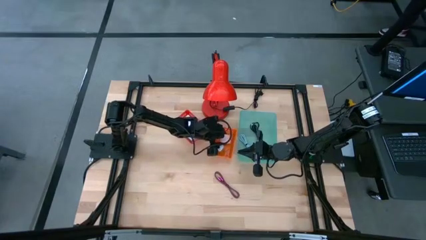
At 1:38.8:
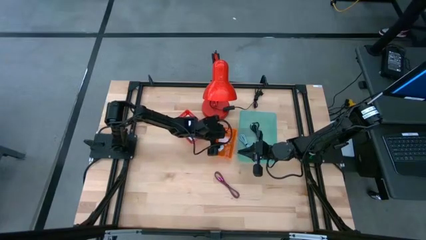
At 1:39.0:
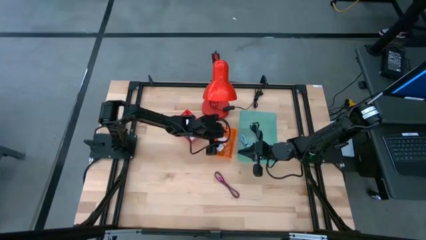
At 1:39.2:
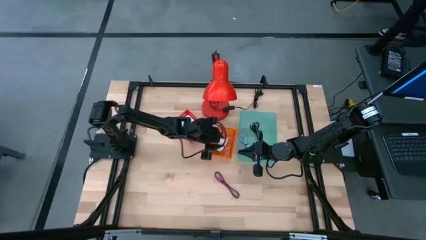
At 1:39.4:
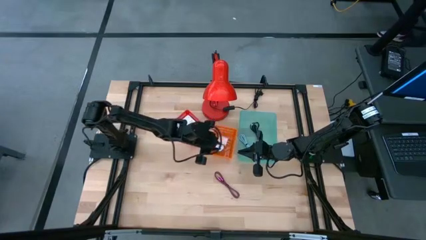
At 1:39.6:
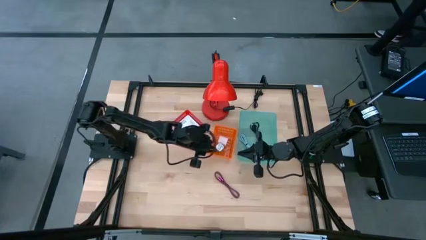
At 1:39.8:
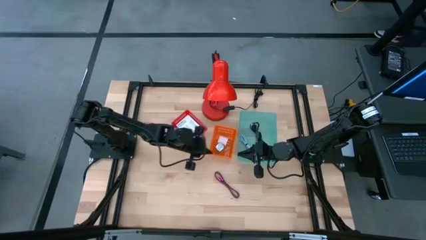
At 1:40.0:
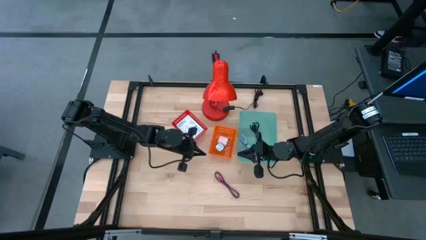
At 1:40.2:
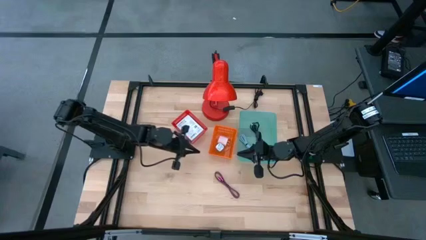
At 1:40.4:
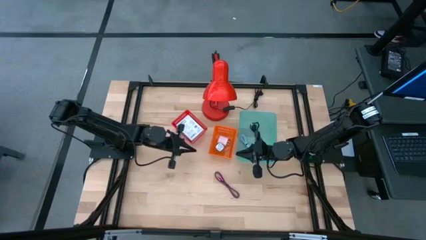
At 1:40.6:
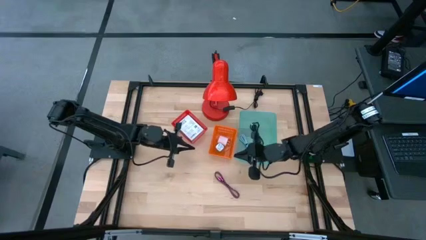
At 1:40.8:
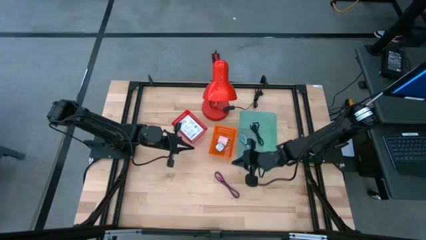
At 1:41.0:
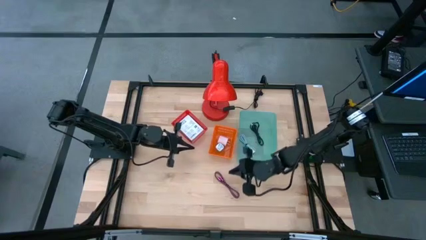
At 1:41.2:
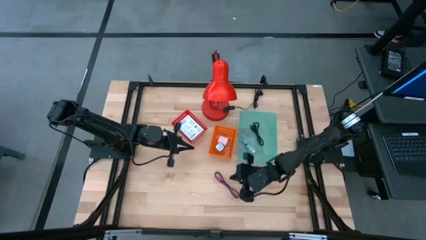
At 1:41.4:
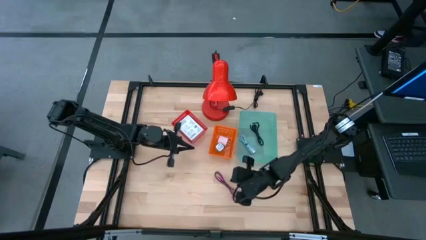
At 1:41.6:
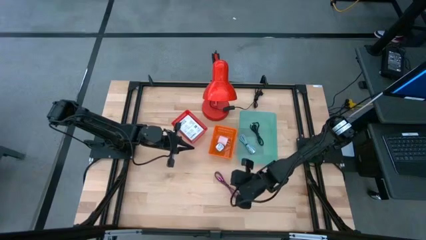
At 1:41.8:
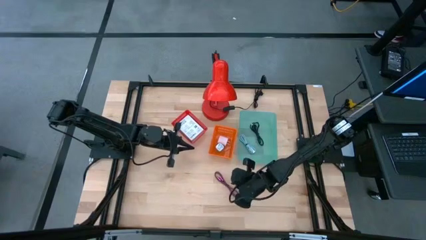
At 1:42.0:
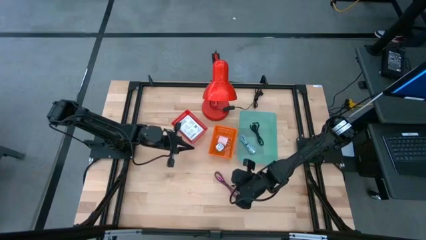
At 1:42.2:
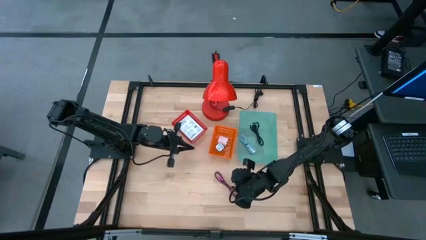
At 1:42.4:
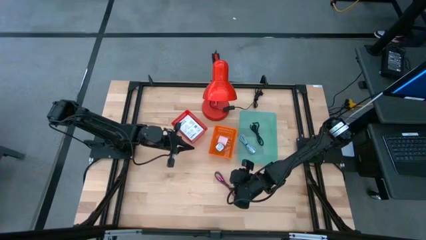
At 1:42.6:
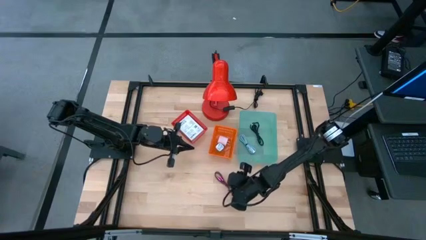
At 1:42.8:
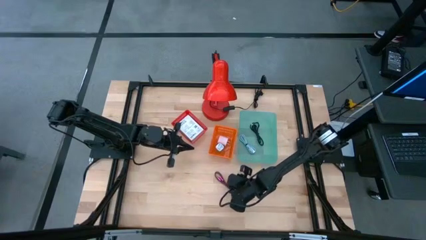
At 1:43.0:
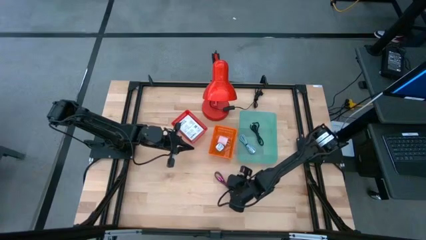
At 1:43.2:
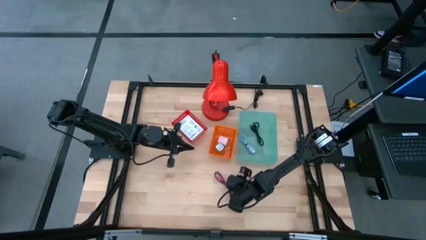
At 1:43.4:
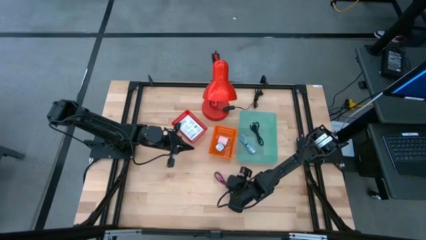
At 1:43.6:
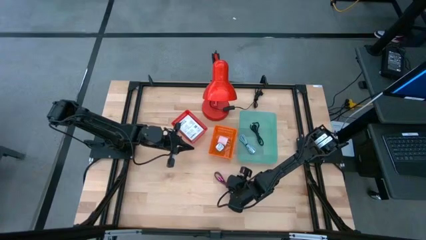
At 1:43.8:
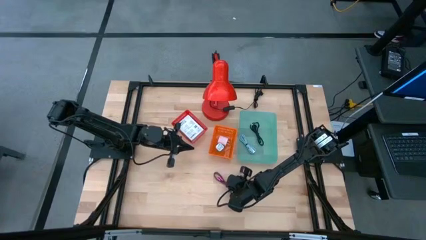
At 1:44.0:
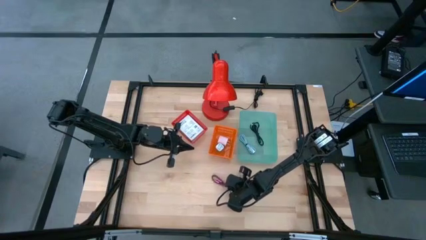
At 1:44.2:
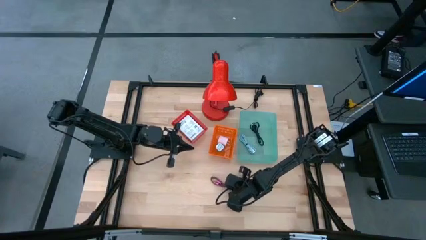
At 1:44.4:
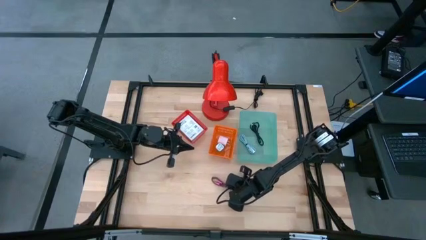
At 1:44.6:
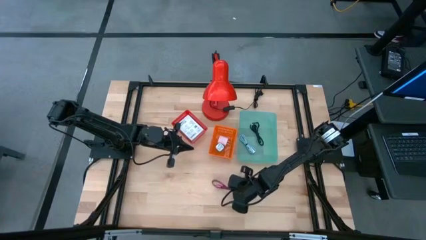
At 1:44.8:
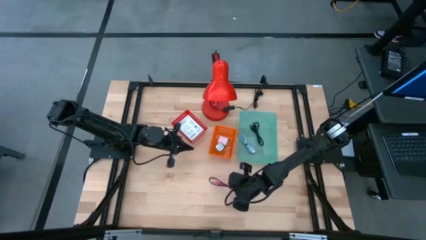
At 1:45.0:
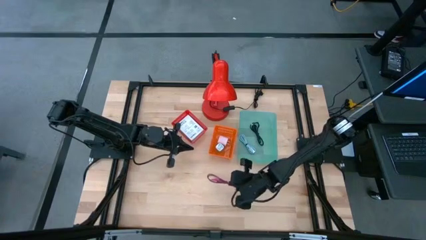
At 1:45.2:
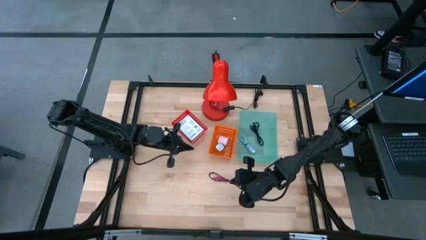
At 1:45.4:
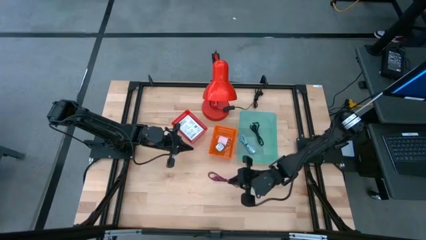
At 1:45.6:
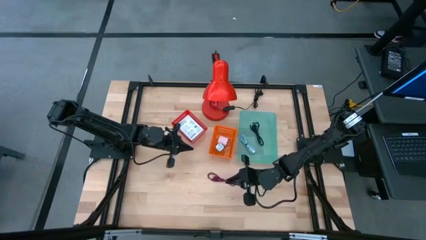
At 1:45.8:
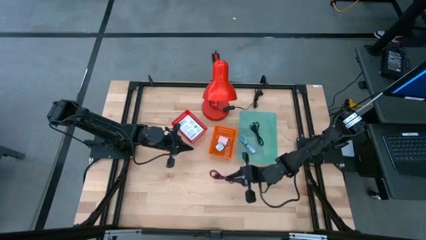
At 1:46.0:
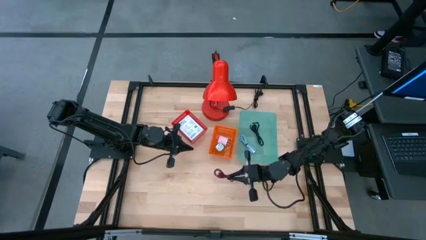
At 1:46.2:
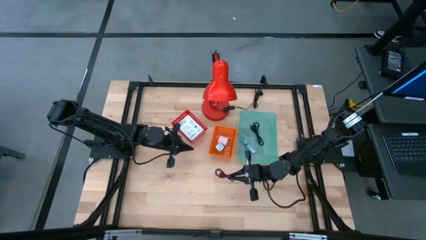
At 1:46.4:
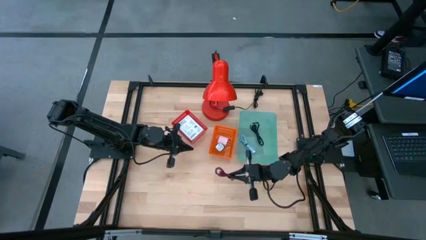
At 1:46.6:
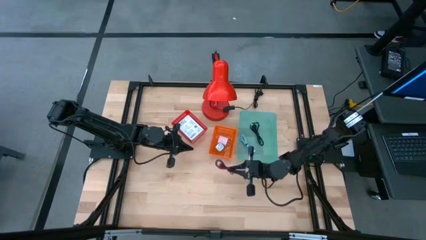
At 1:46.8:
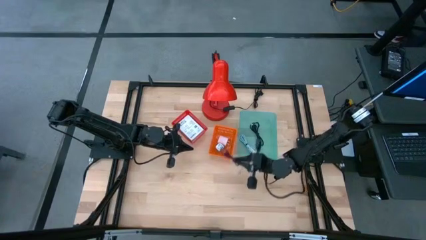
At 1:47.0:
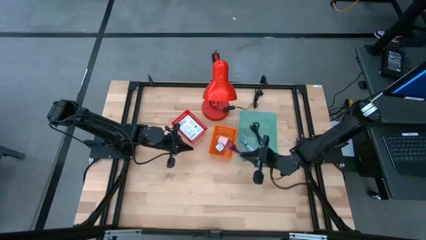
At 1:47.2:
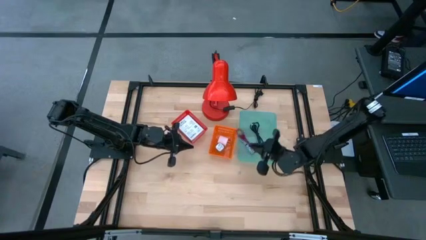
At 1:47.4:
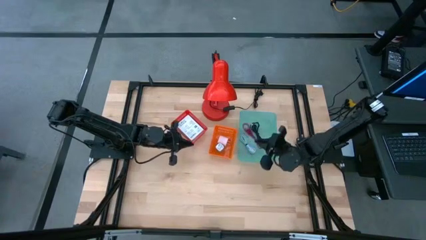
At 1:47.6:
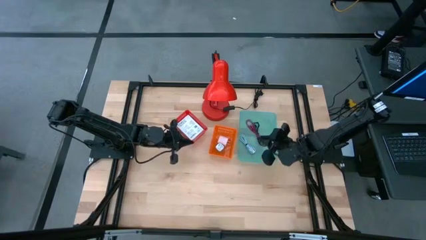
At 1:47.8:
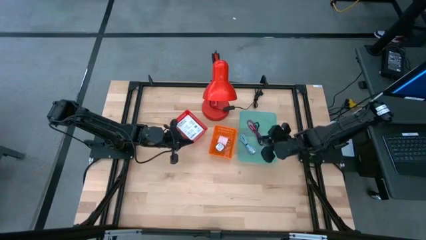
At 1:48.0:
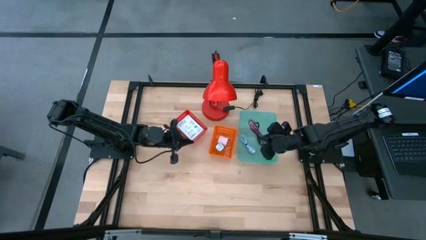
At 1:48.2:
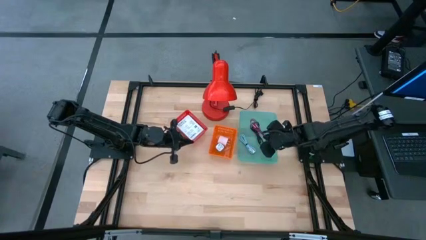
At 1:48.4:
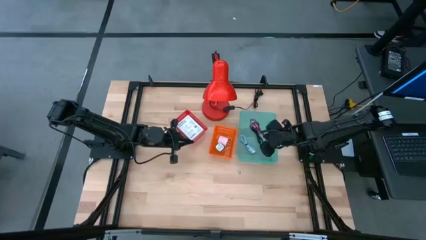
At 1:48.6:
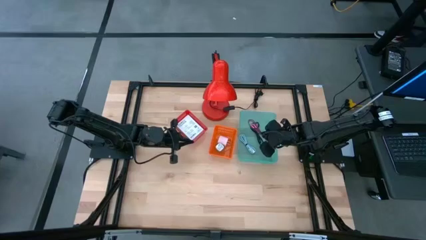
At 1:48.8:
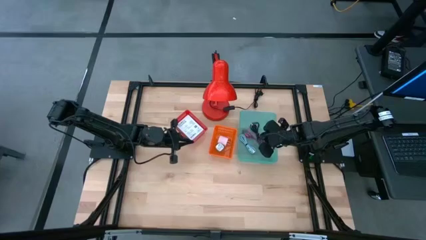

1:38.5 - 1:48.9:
Task: Pick and place items into bin
Put the red charger cable into the green bin

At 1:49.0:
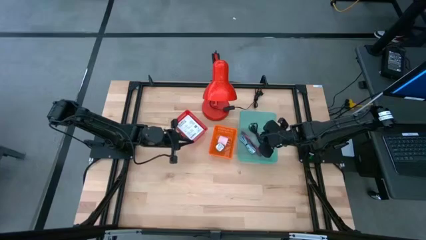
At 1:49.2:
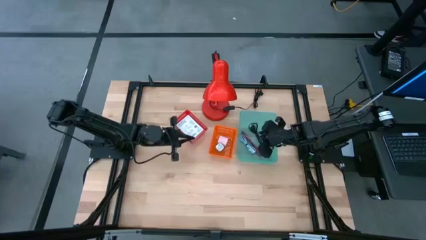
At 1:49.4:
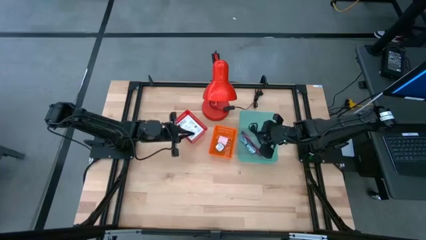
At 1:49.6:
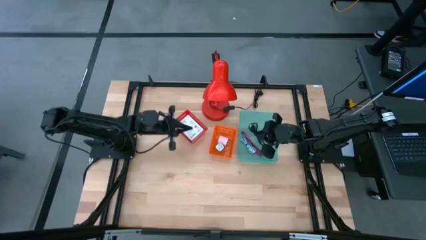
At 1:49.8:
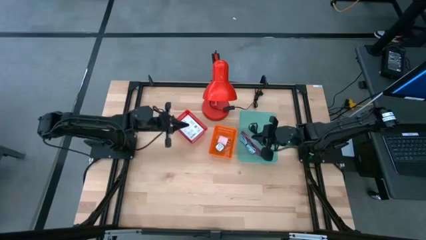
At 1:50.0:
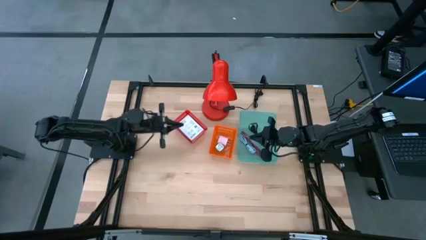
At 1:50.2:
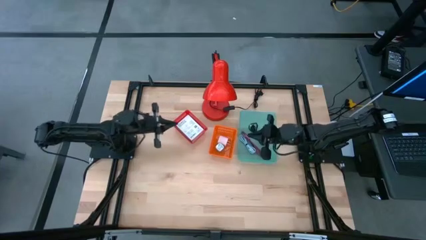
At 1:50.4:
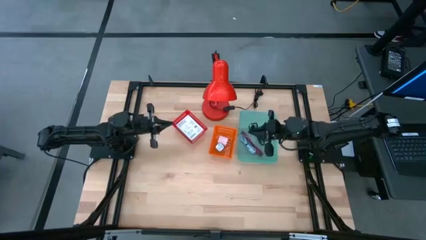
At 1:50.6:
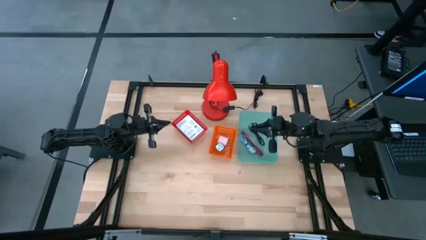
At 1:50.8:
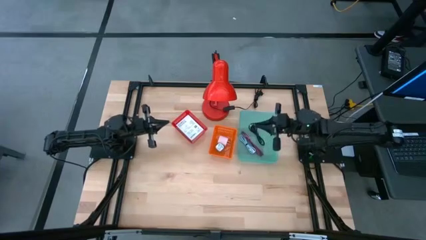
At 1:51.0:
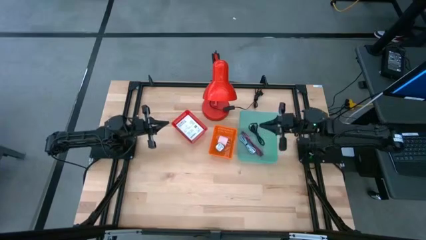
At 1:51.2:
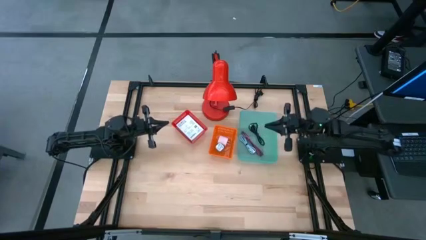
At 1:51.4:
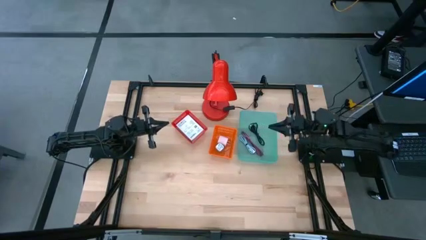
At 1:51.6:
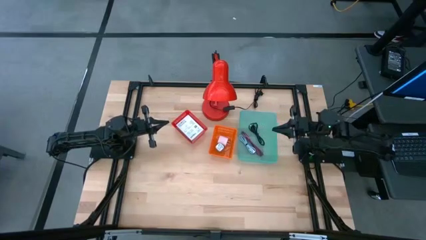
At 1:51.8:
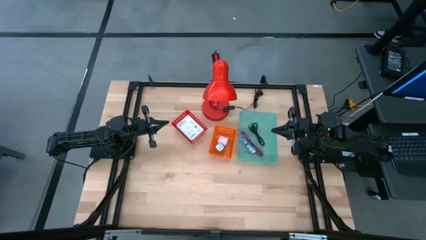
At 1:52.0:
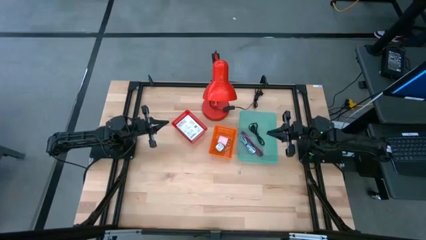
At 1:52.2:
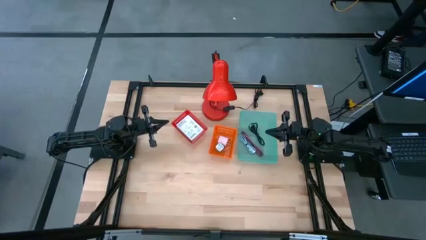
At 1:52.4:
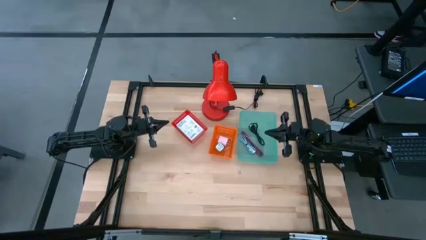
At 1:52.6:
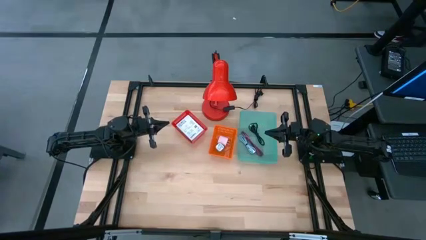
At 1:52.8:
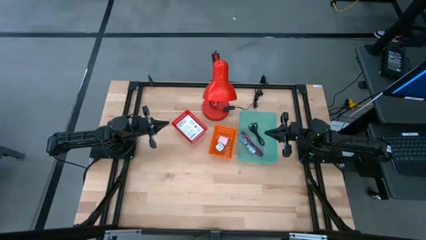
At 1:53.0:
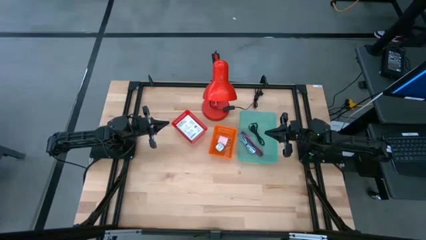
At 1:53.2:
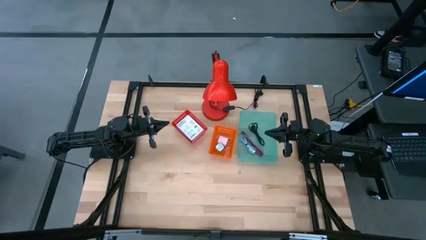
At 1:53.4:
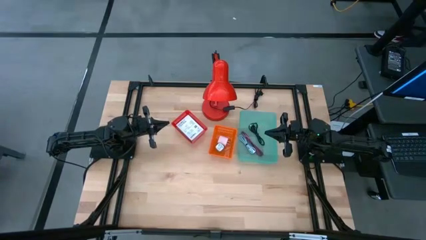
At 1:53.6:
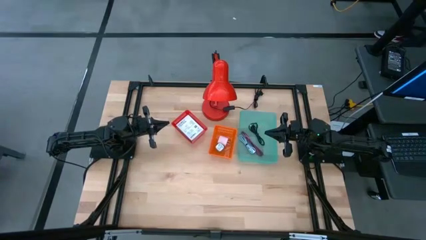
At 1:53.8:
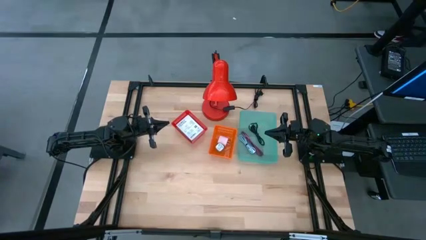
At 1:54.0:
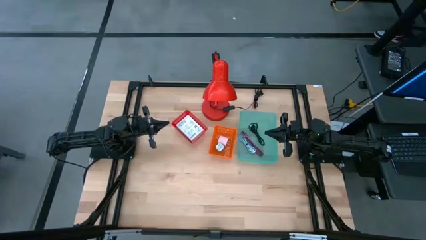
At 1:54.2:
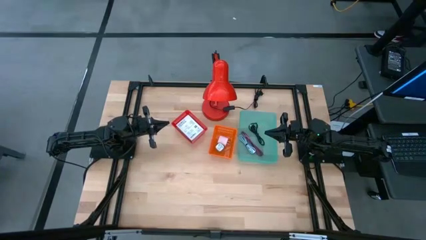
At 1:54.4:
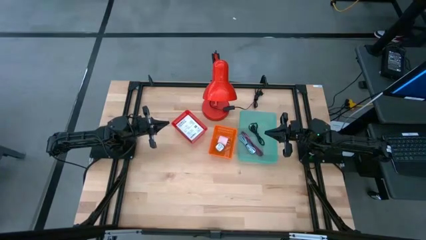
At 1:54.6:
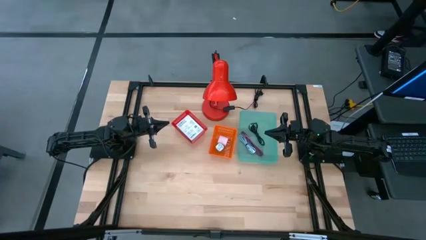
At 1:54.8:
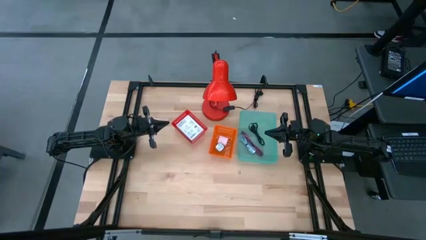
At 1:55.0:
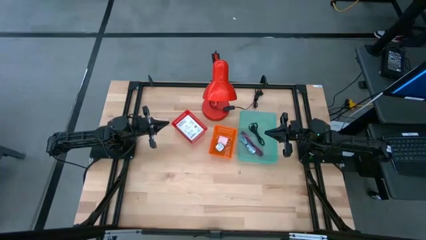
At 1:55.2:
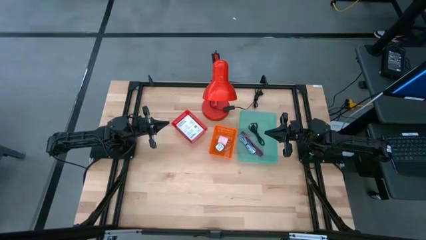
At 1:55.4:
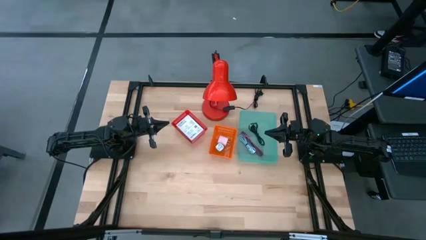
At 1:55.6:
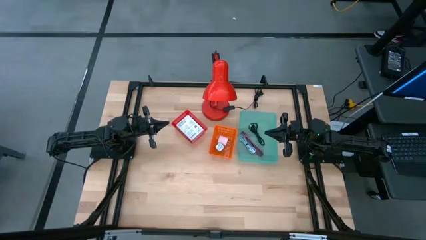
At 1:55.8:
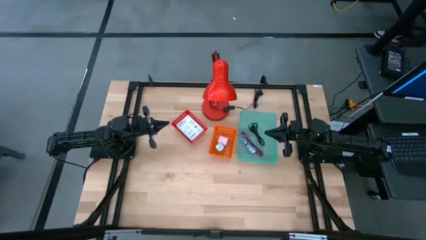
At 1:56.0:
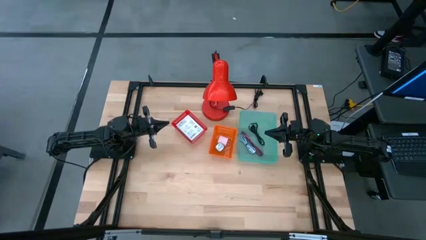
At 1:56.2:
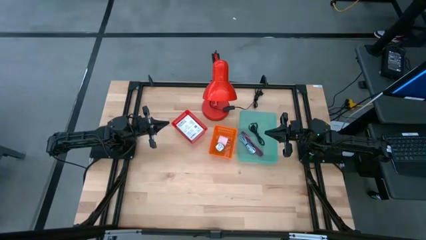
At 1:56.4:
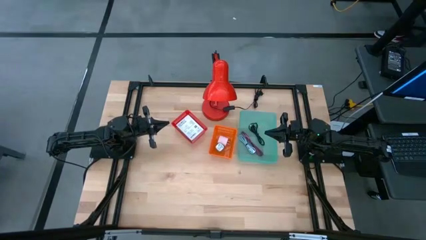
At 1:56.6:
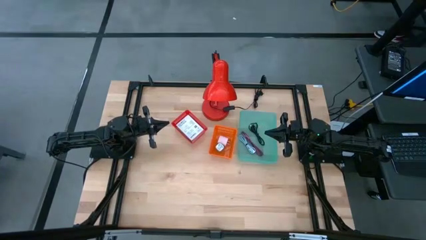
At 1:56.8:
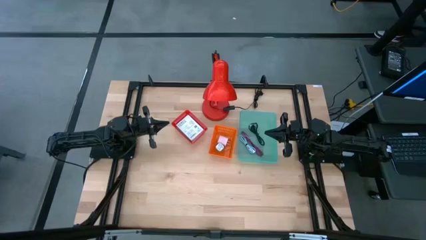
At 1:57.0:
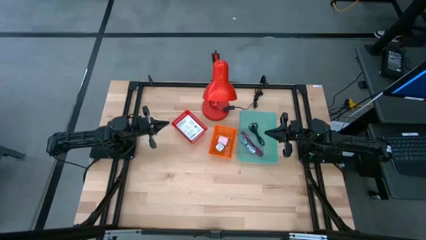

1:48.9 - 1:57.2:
Return to Home Position
